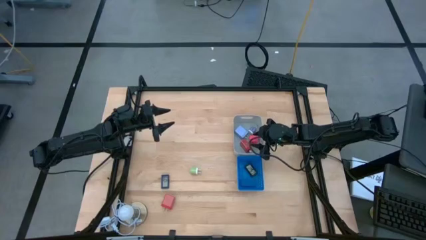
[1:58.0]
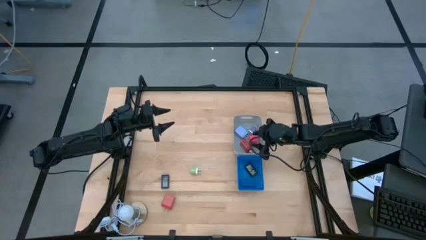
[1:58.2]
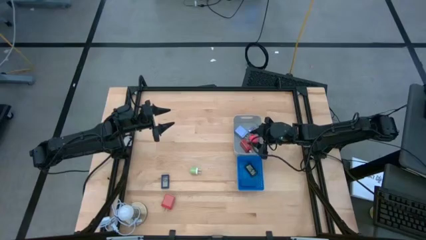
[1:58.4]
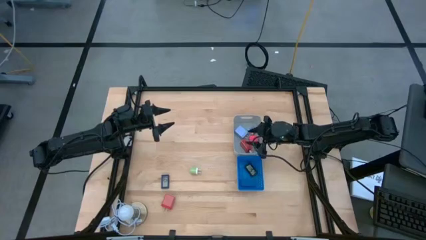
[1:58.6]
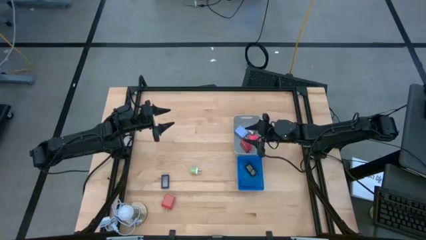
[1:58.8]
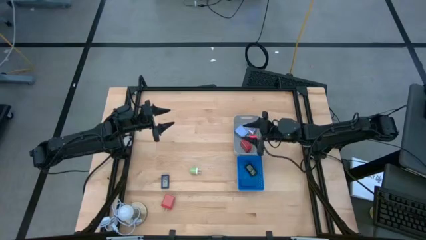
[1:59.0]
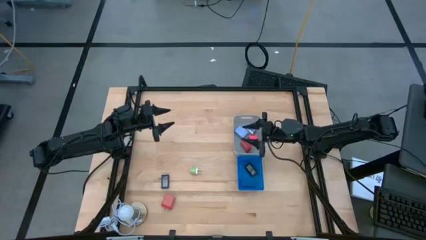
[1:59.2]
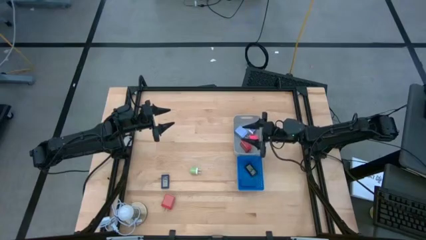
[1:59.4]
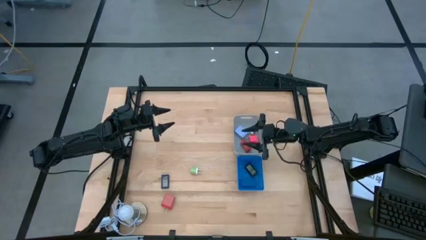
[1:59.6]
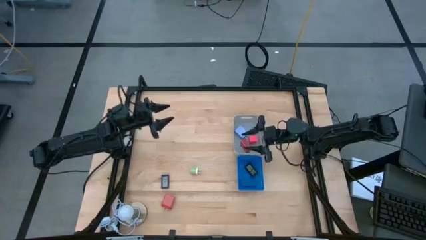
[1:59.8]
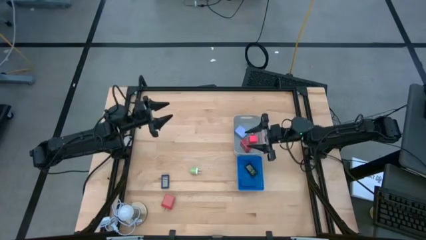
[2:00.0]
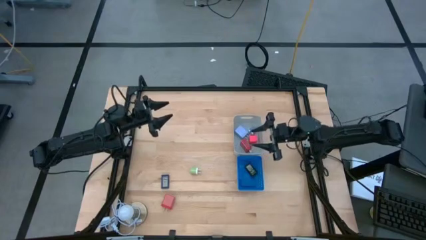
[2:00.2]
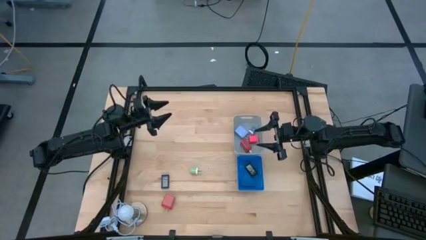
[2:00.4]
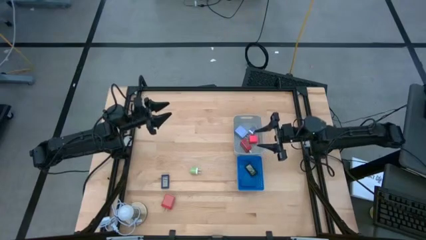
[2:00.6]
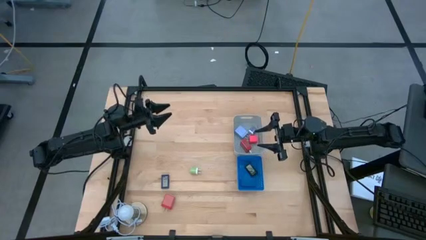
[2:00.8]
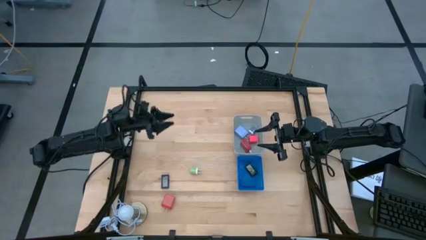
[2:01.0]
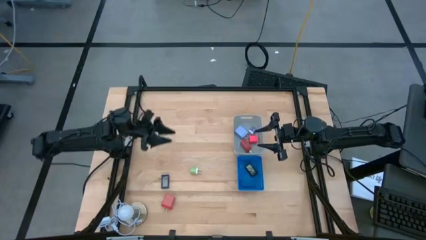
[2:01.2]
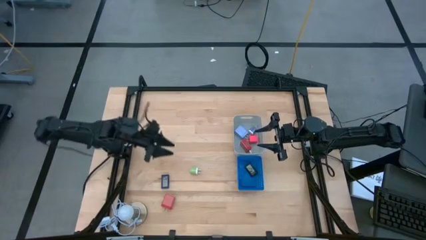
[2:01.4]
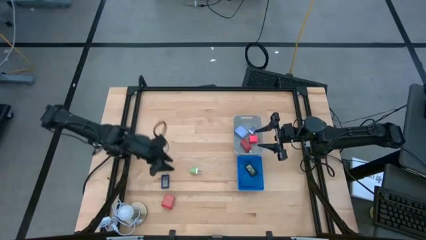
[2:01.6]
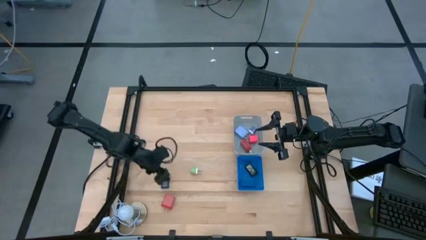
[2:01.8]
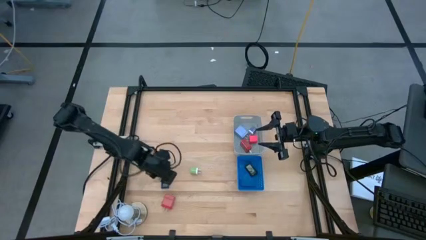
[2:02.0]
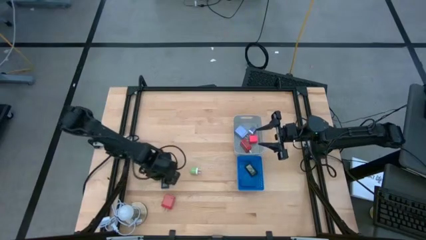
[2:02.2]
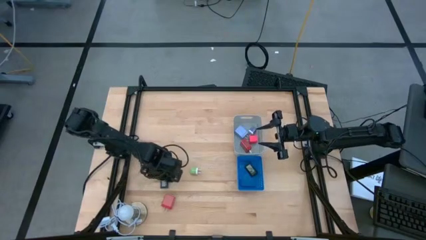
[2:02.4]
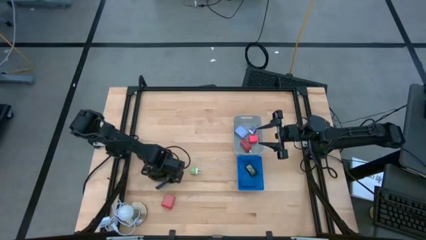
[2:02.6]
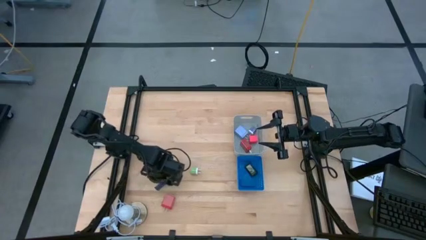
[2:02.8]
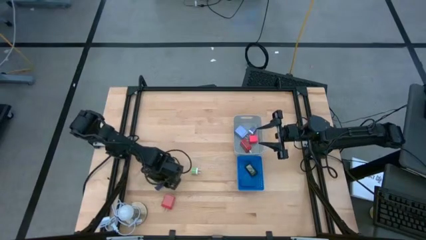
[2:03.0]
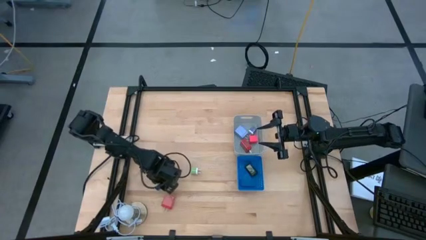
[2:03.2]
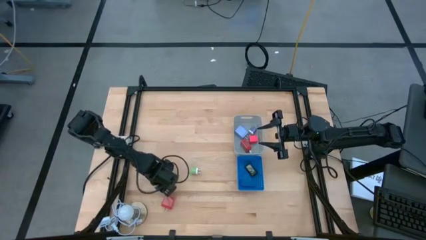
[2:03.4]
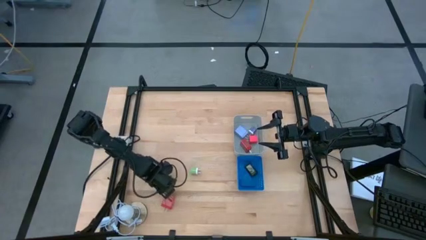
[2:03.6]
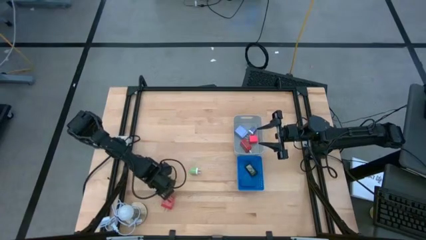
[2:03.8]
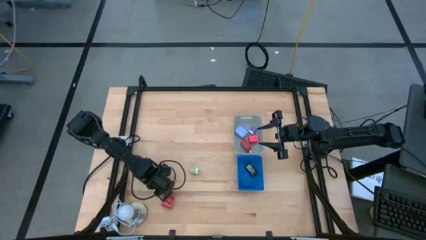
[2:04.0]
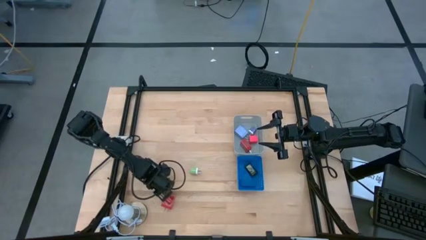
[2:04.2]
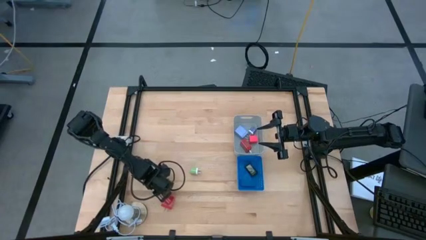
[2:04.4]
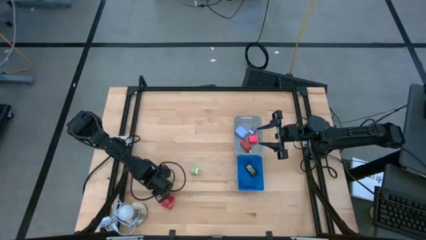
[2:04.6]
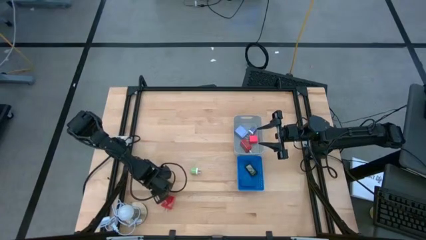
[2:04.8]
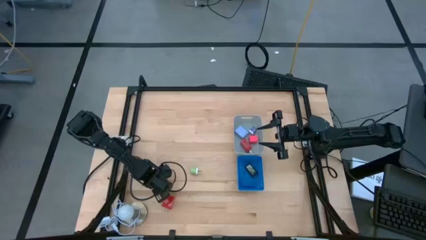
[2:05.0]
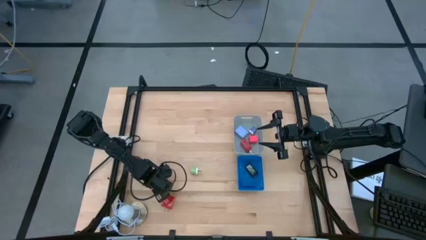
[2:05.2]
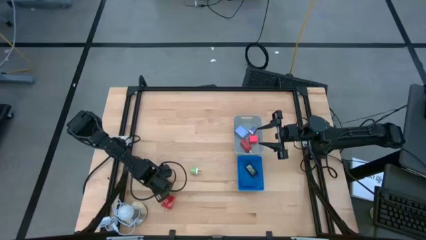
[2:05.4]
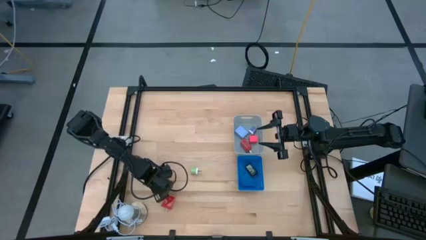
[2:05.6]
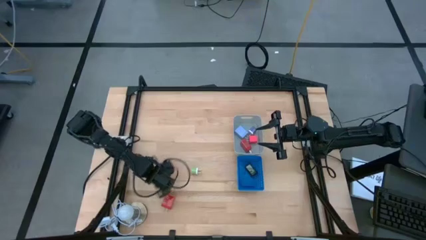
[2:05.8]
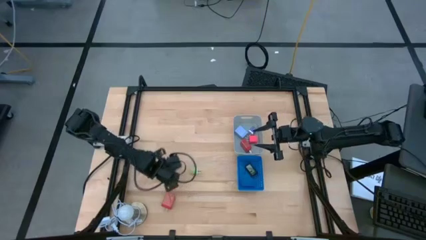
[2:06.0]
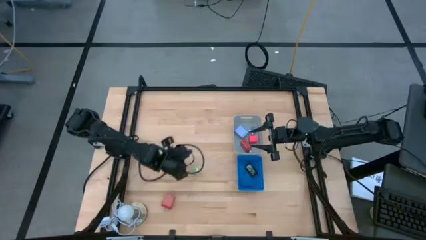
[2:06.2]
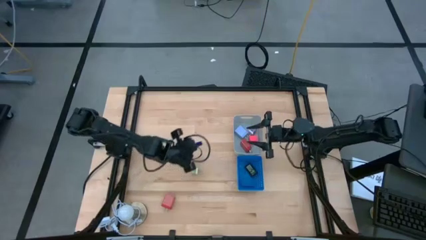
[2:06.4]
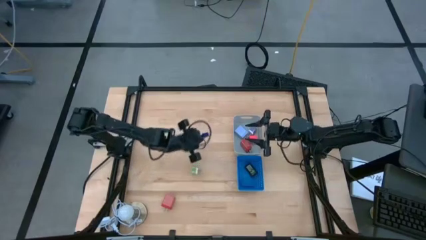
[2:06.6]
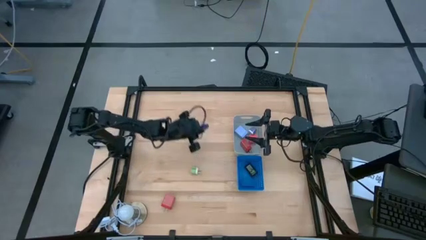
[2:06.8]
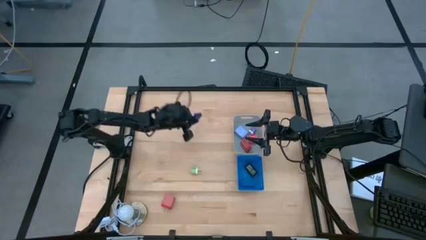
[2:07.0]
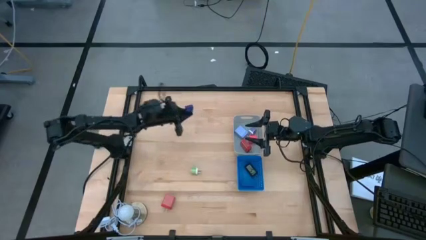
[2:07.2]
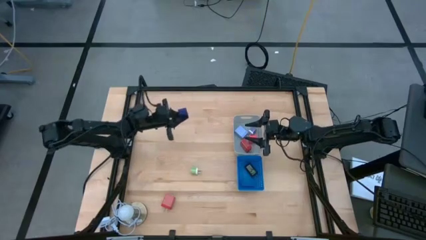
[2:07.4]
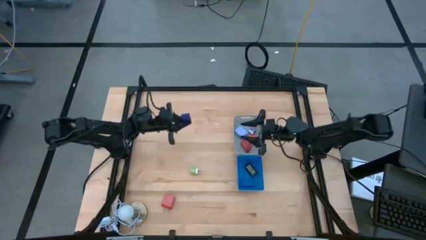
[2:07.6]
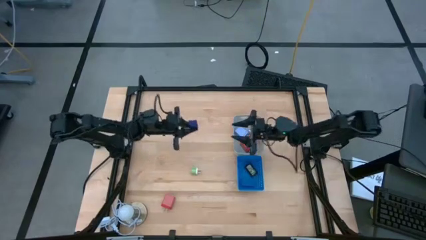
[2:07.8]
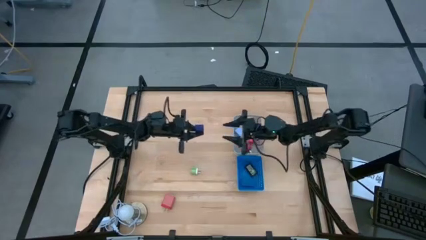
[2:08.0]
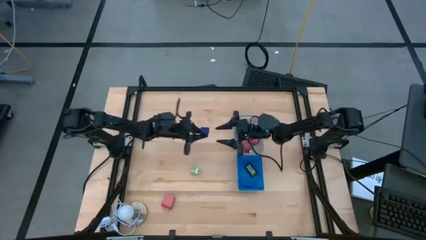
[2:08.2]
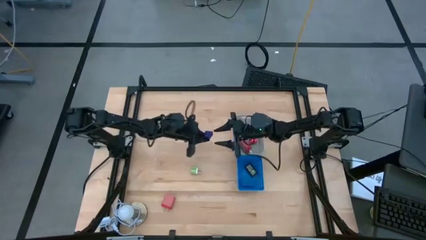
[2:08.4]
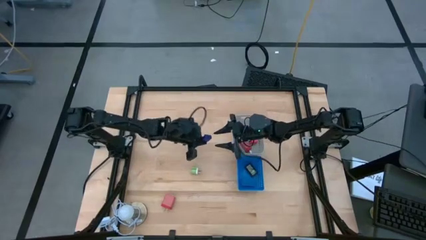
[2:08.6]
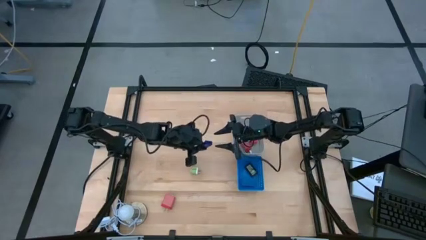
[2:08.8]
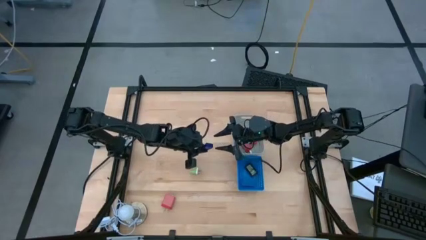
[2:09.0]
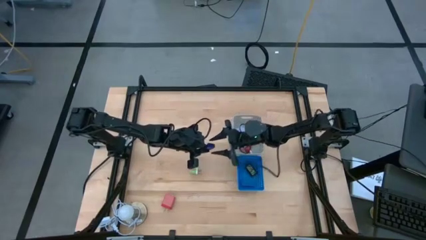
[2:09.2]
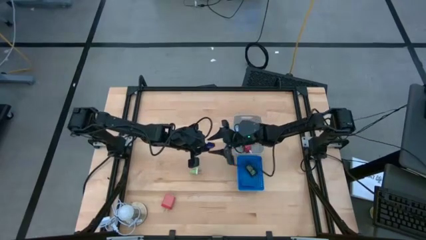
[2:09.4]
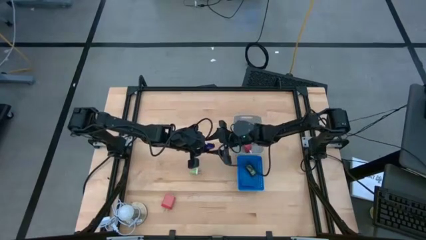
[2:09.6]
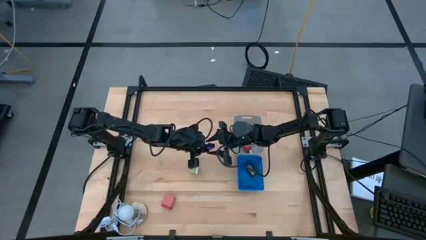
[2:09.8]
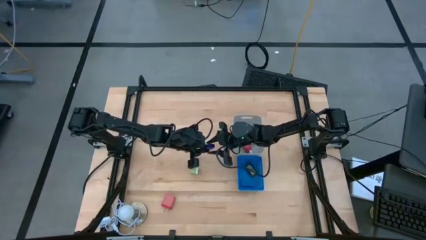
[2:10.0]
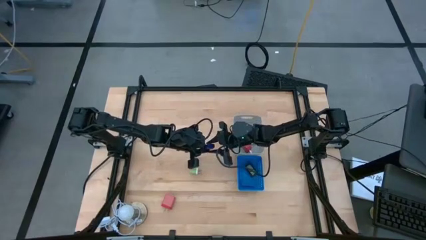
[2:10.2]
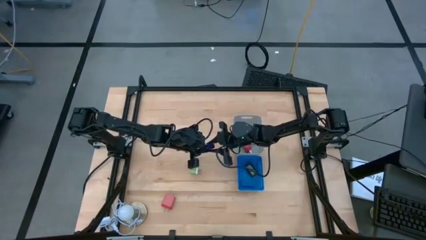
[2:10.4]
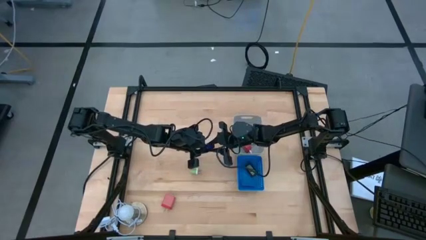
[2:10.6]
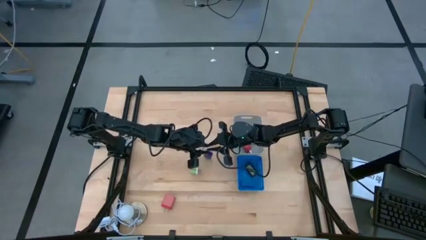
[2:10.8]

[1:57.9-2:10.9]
Task: Pick & Place Office items
Put the blue digital clock into the blue bin

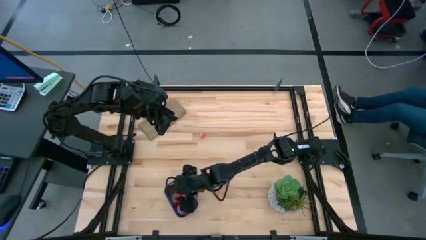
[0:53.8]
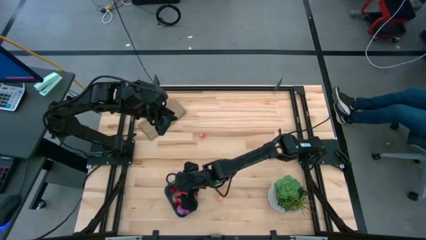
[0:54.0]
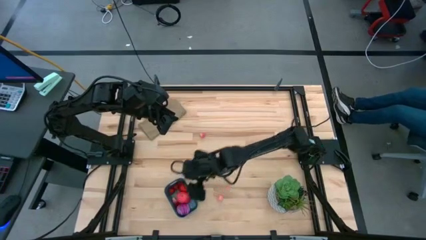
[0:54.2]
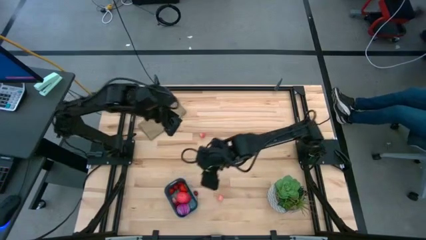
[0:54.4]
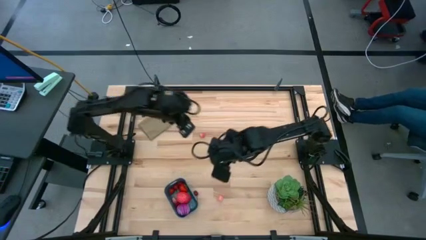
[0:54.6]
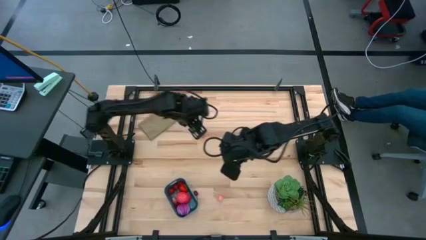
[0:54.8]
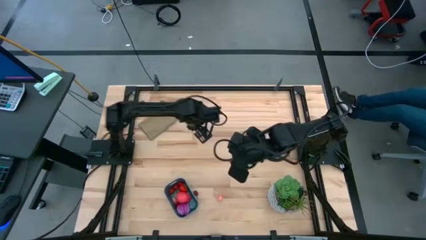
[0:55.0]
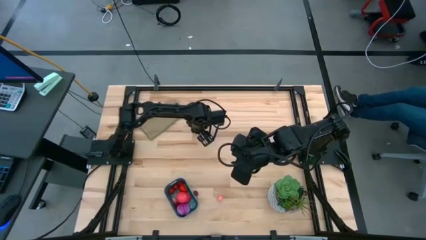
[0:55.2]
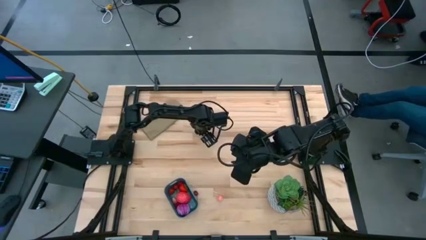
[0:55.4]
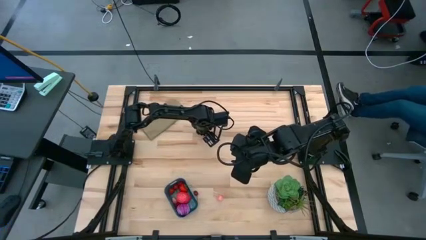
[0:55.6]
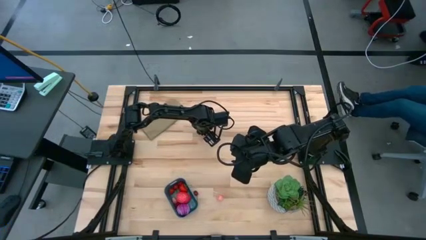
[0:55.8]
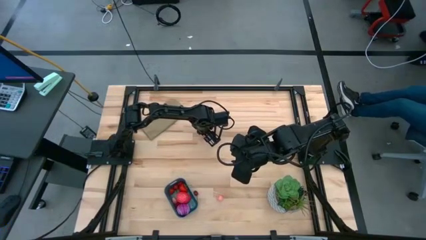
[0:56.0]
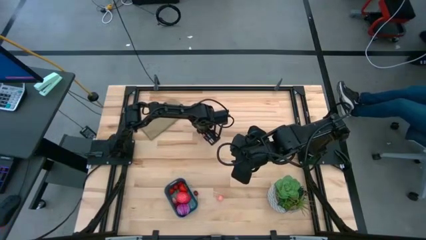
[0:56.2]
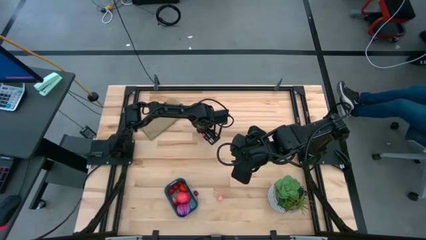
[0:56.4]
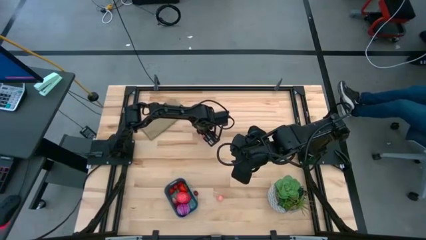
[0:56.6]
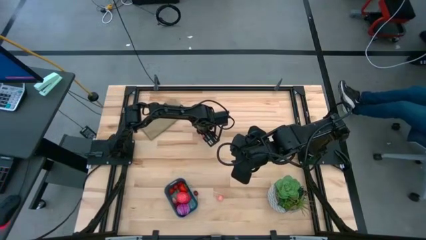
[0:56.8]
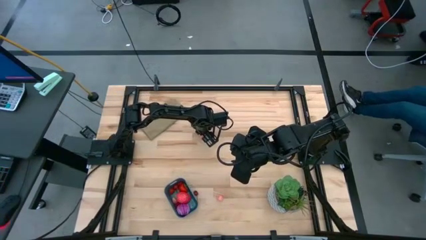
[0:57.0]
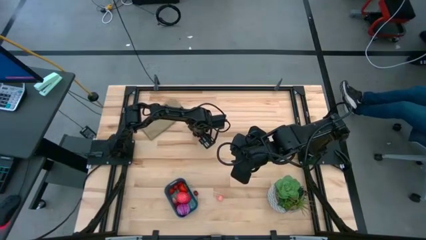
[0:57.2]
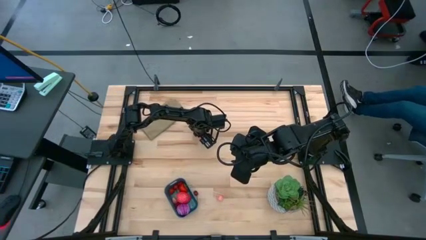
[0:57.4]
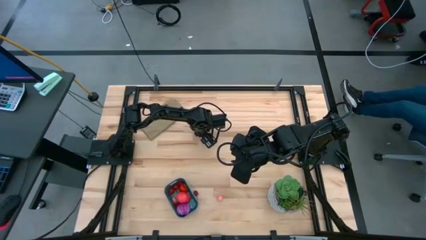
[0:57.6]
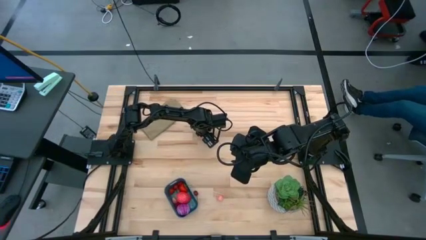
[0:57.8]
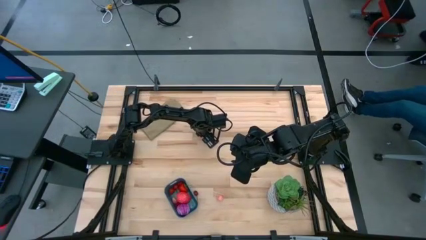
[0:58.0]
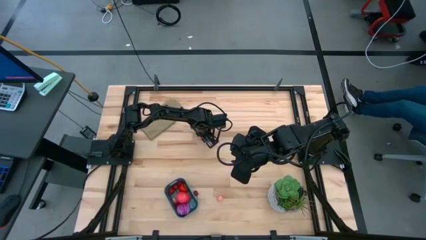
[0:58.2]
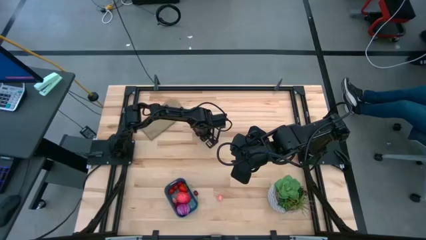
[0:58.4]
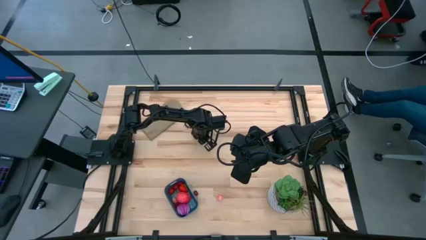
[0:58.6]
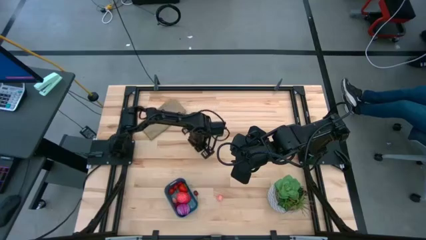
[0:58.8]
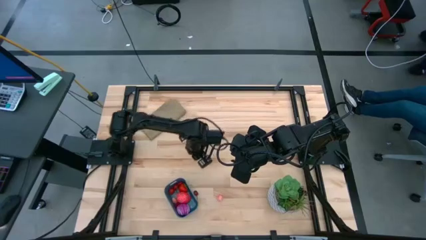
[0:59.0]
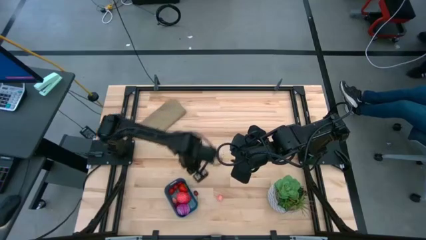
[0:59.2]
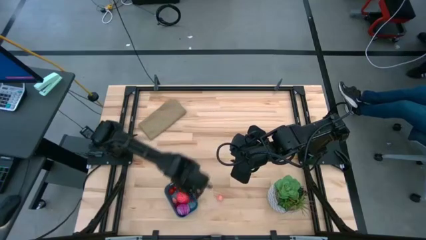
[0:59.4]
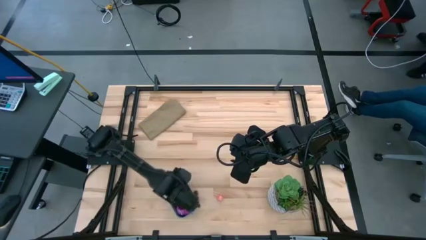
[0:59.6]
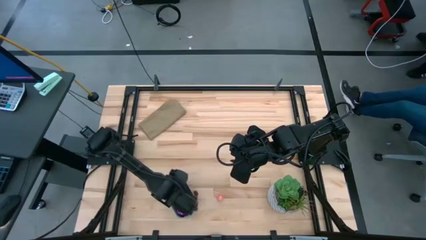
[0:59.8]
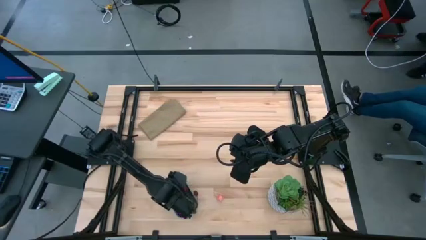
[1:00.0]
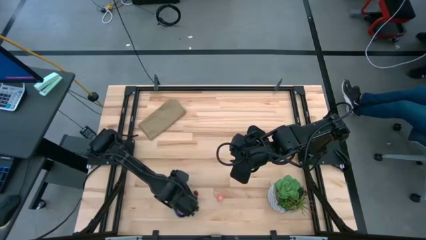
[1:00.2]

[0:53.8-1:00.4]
Task: Pick and placing Produce into tupperware
Put the pink peach into the blue bin
